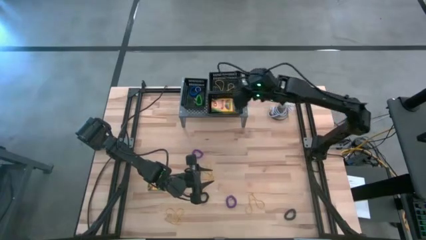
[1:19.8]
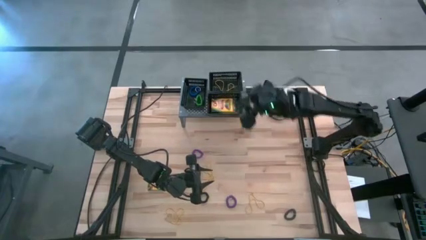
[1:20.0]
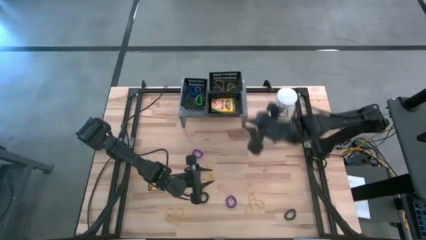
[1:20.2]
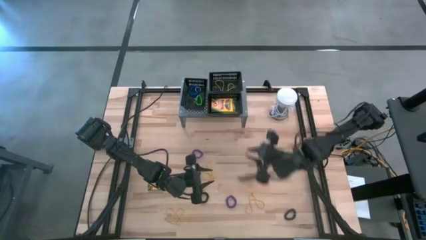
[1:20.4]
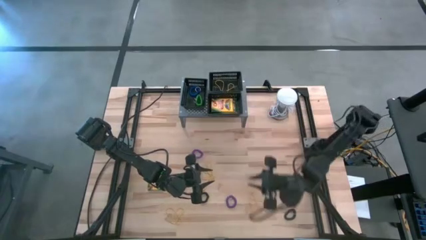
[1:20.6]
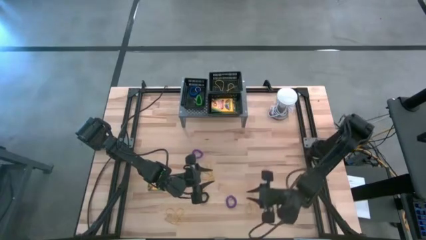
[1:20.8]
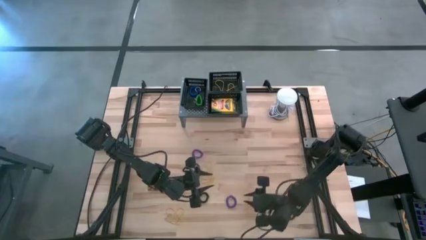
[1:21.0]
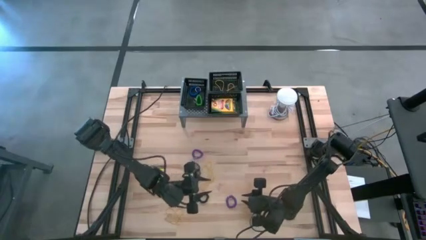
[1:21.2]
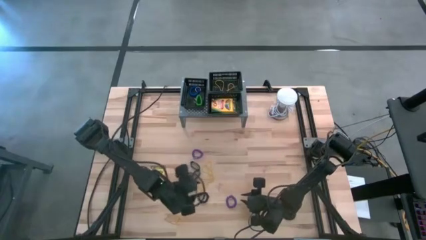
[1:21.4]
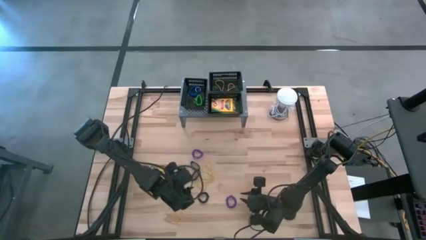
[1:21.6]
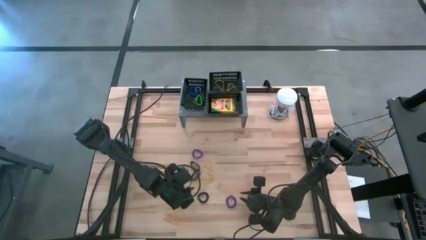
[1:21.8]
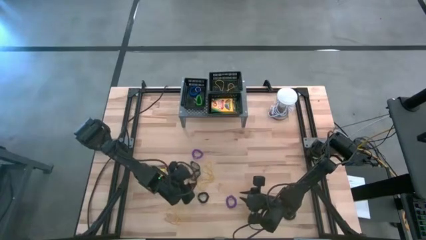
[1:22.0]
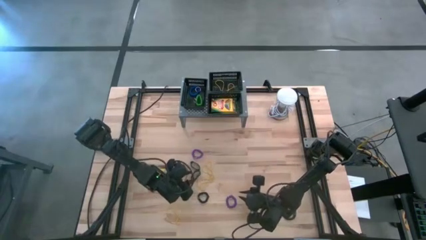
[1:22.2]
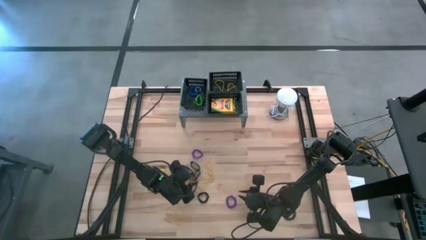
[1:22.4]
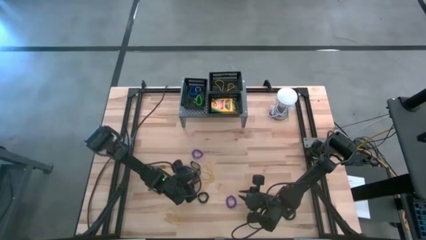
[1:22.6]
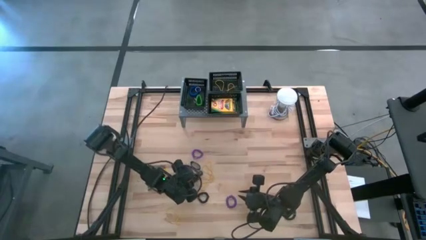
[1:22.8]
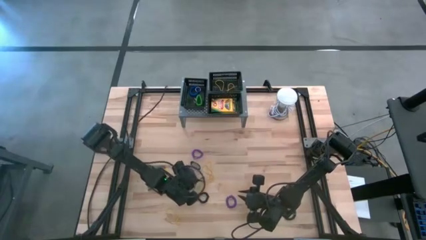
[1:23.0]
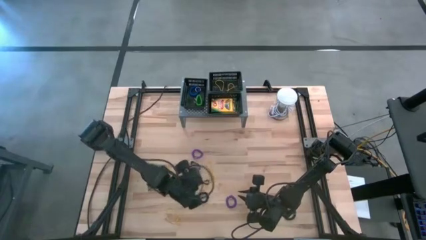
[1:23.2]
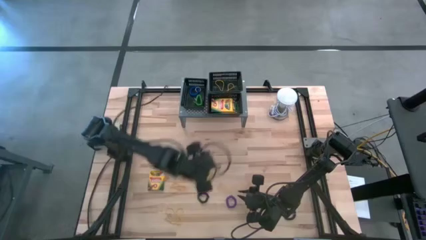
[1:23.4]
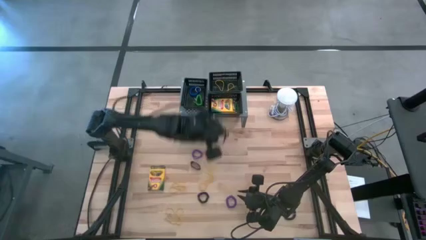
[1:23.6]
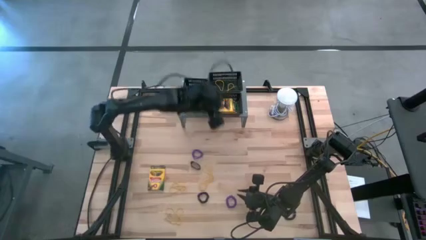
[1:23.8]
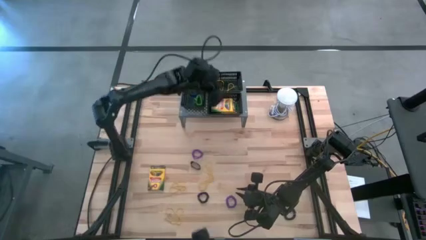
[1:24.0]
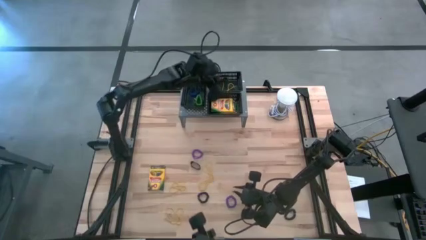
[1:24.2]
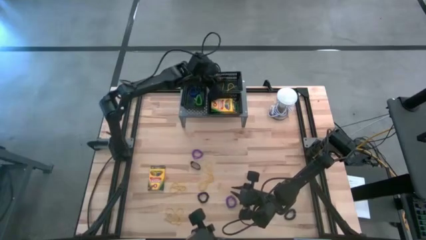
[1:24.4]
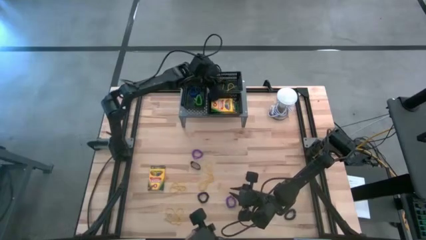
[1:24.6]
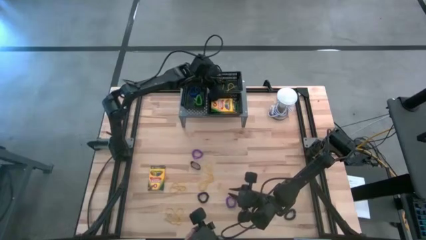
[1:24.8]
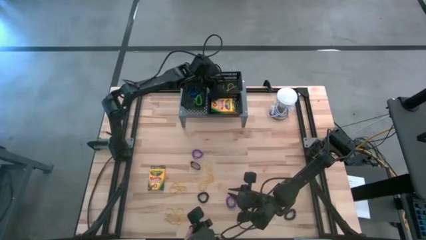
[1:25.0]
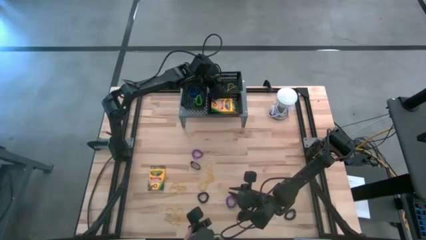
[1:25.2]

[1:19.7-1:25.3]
Task: Pick & Place Office Desk Supplies
Put the black rubber band into the top black bin on the shelf

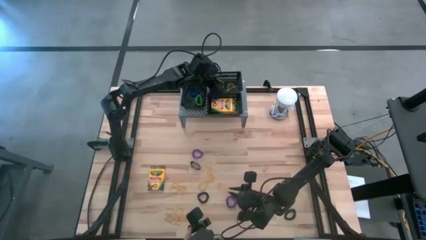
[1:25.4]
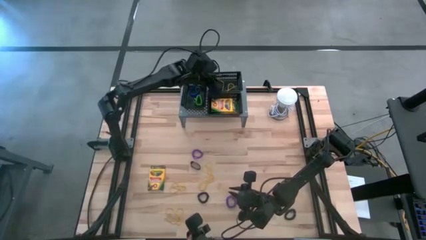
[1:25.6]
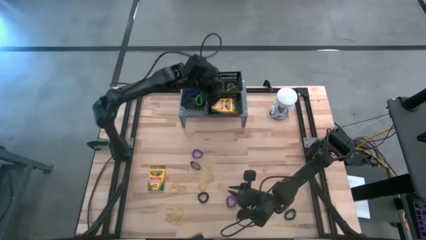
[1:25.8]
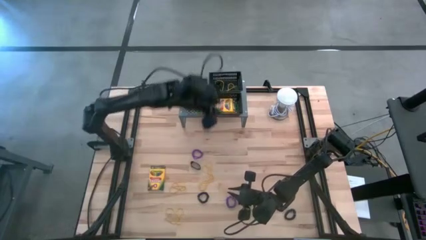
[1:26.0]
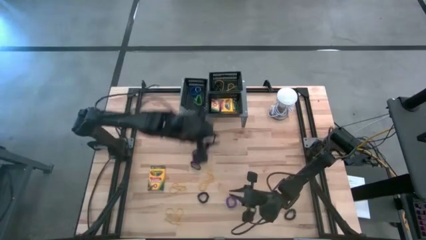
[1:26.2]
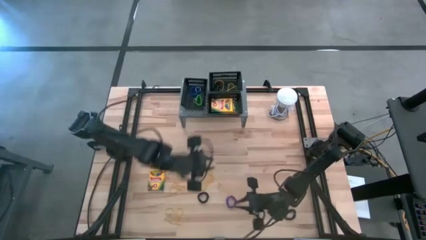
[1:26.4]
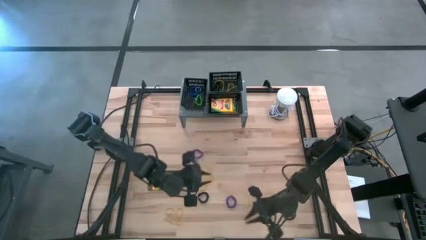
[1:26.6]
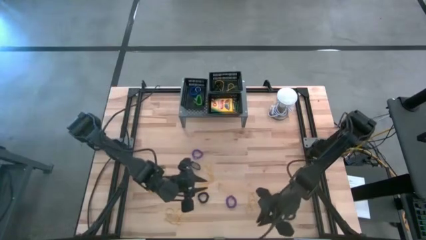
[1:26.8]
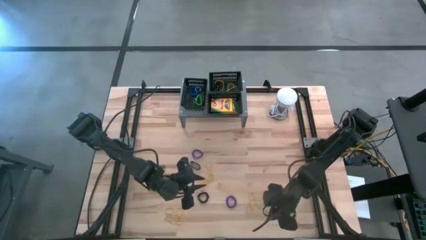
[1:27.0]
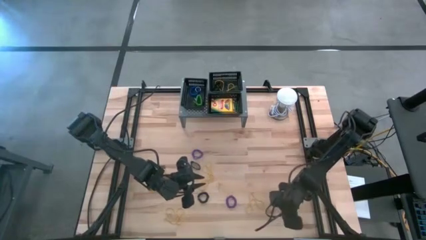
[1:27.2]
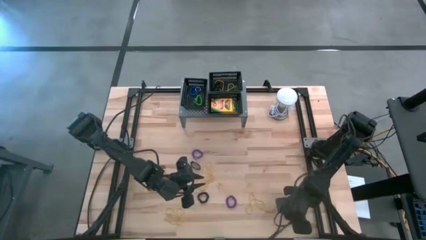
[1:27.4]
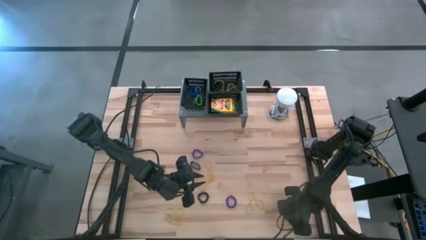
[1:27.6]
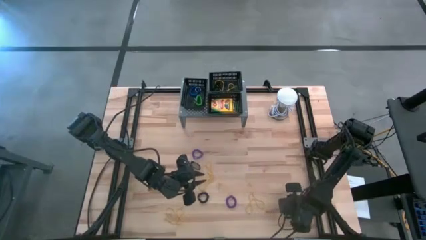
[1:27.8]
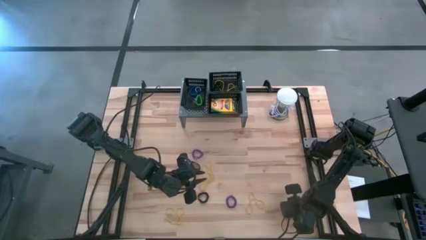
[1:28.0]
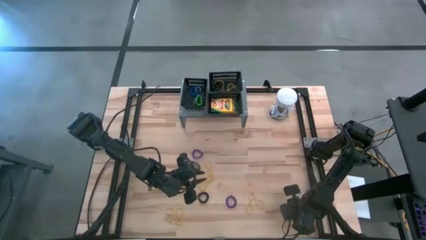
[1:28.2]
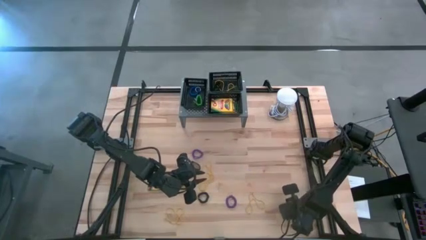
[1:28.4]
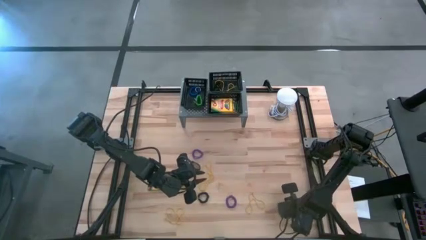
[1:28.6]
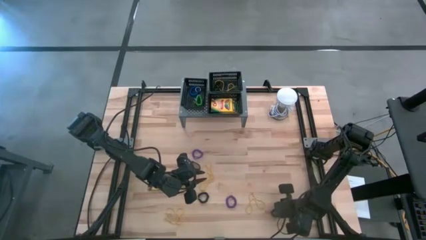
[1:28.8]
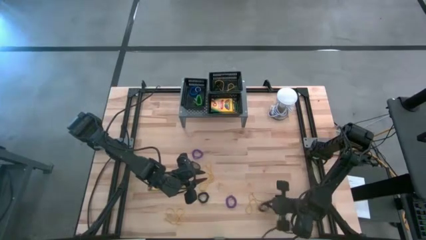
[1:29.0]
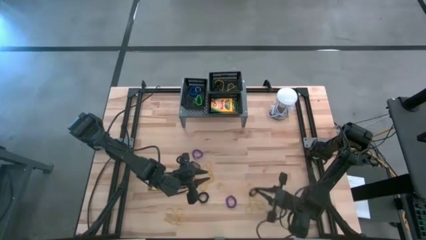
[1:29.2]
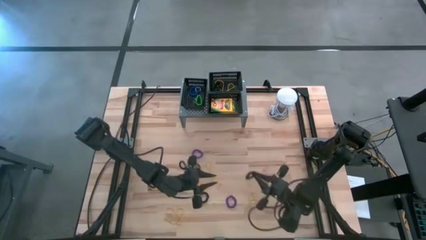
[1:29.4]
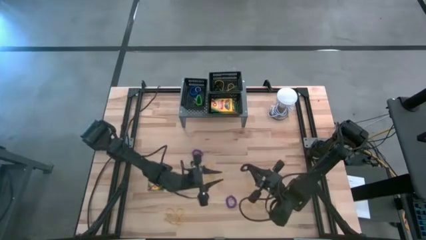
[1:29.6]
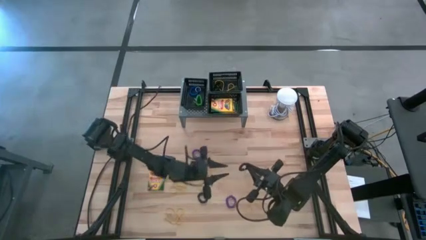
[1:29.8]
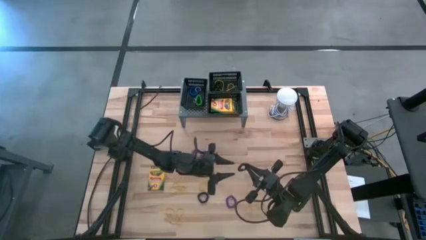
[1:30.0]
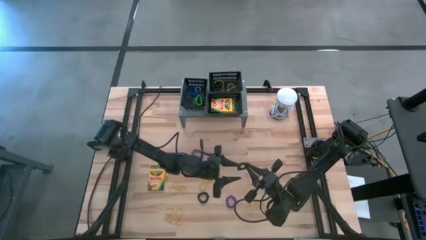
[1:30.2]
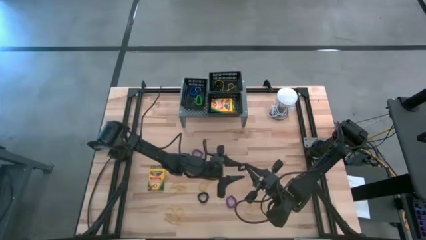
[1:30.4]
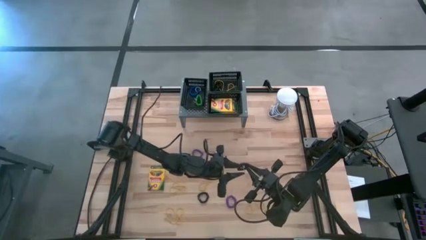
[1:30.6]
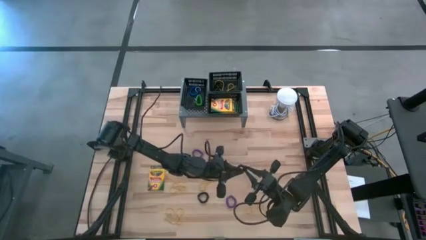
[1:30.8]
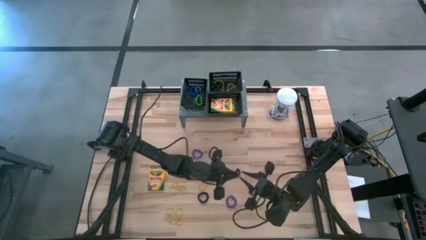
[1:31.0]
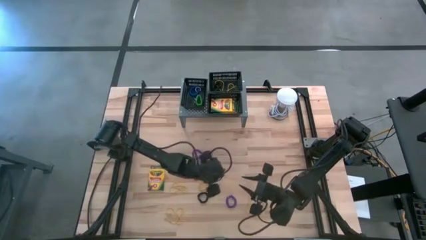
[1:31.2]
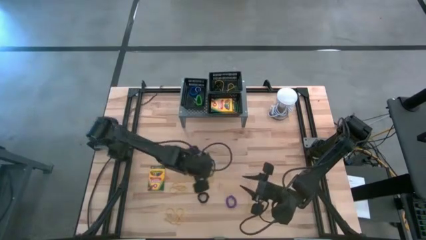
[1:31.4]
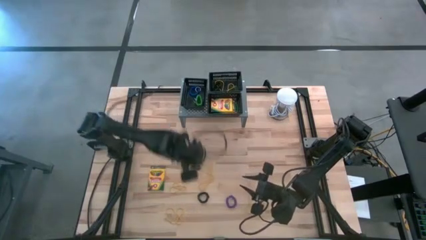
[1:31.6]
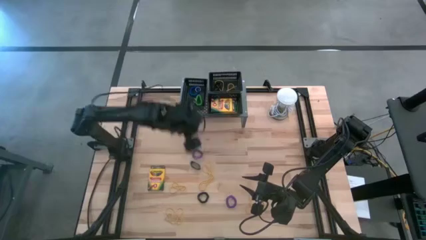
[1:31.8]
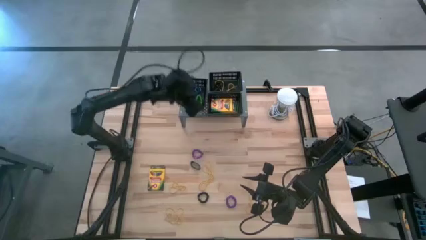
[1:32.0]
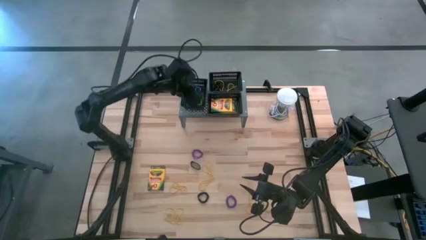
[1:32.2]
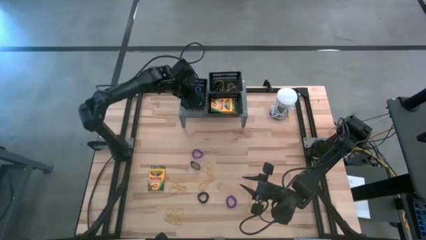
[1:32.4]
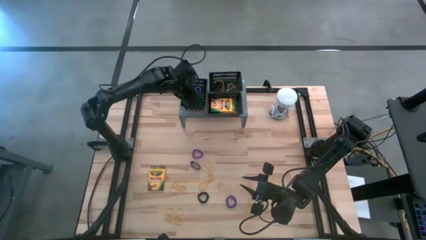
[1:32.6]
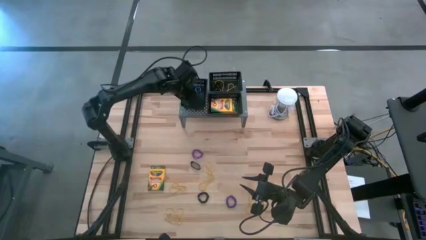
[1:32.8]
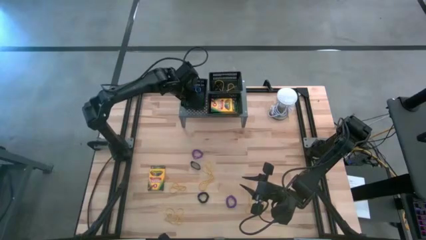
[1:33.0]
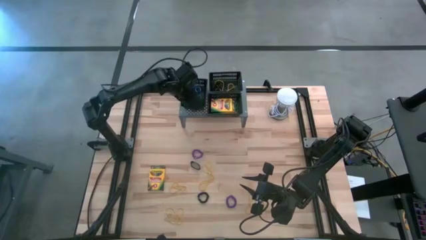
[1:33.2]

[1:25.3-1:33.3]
Put the black spring keychain into the middle black bin on the shelf

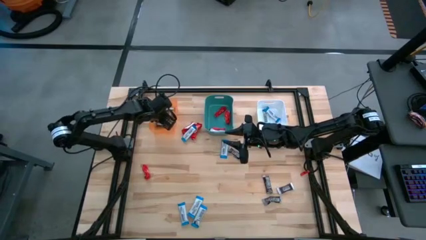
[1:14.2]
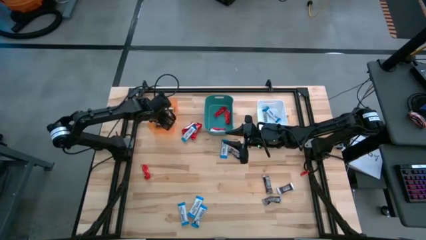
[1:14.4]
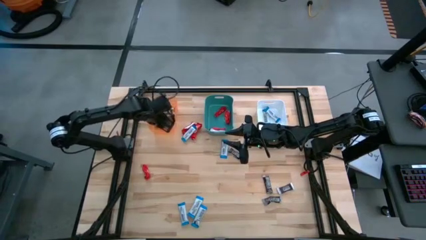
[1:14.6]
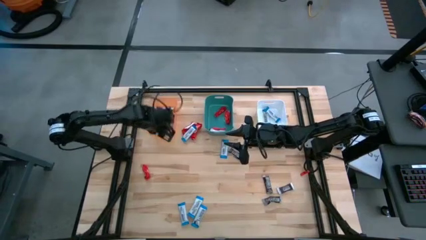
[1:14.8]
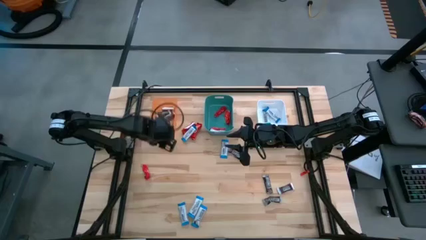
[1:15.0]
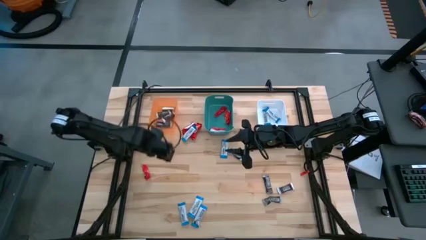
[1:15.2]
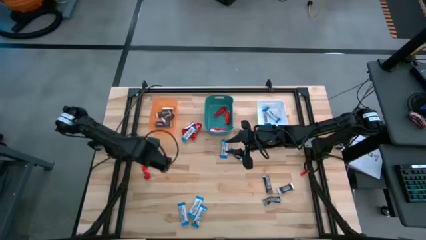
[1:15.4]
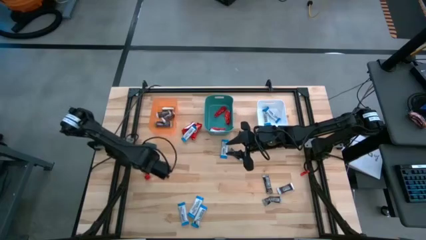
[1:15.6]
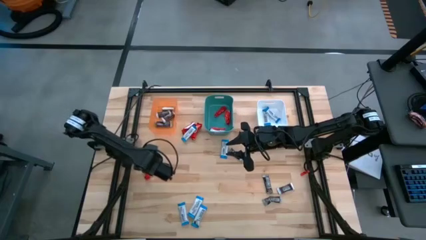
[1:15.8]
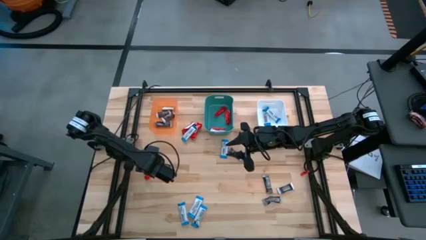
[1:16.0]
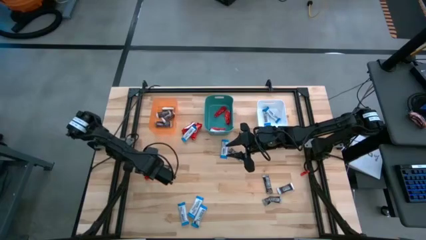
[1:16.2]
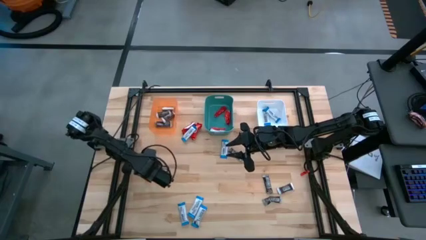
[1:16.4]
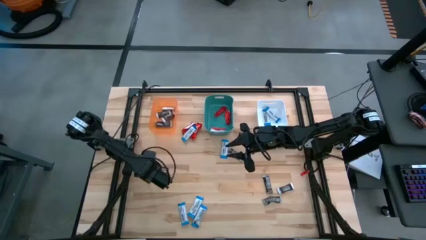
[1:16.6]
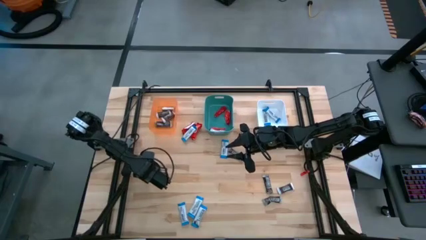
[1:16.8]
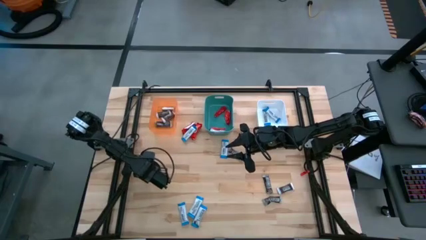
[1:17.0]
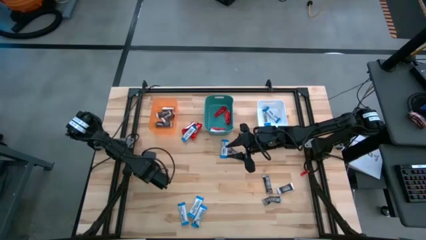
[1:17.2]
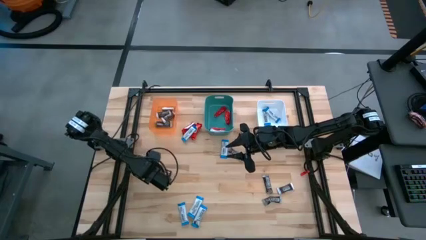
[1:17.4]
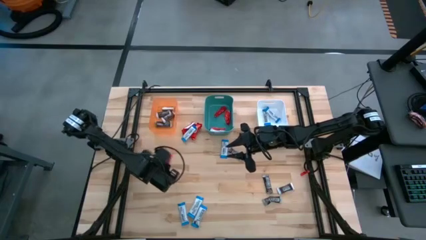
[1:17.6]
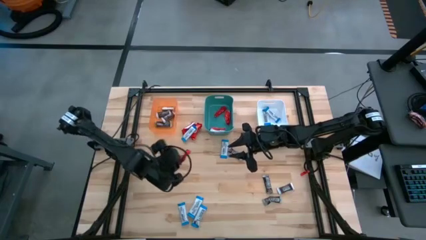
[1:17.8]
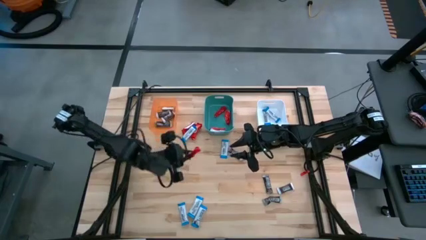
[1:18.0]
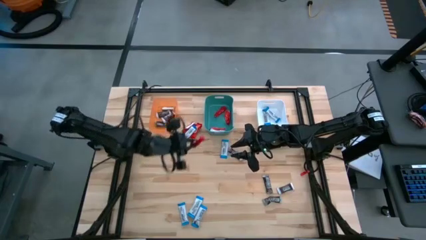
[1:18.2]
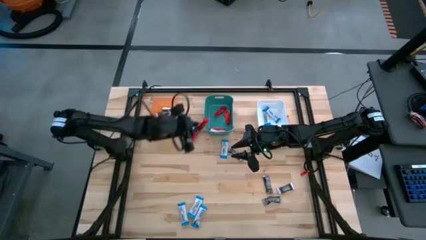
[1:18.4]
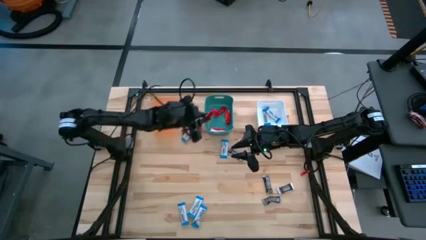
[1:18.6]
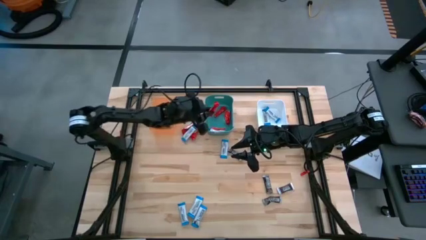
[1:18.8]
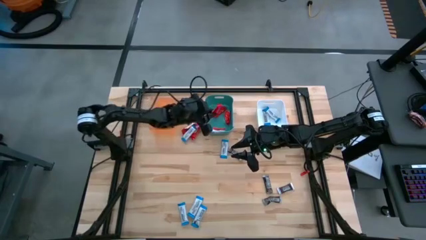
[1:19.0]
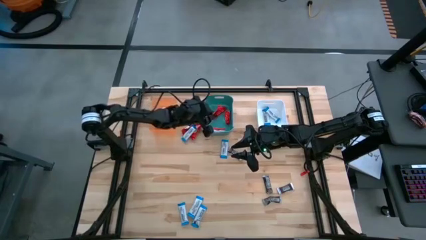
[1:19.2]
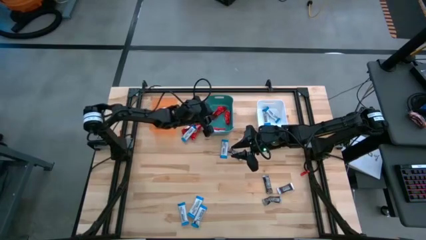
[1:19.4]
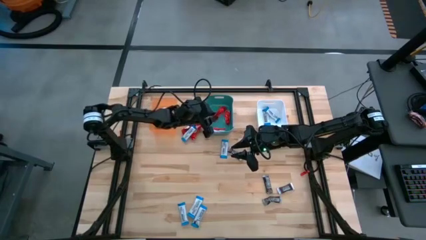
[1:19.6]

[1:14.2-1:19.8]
Task: Organize candy in baskets
Put the red chocolate bar into the green bin
